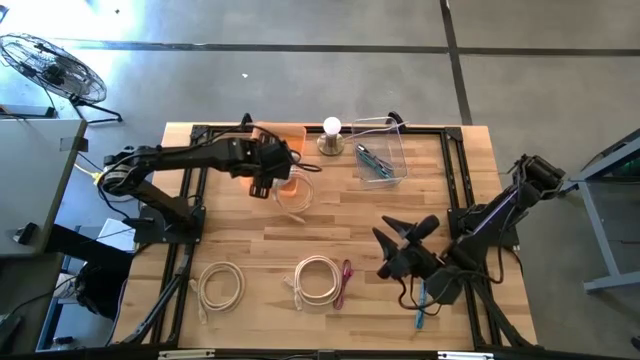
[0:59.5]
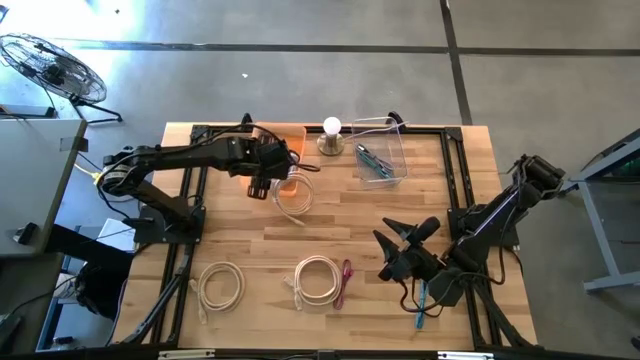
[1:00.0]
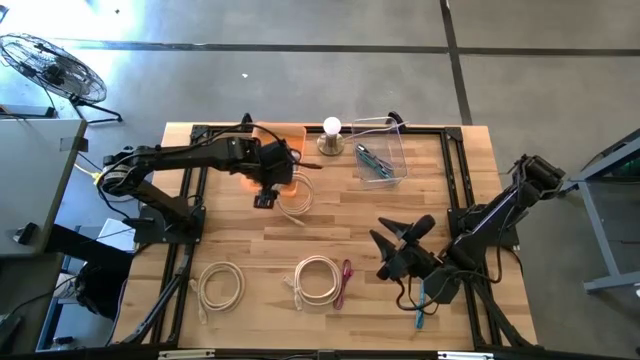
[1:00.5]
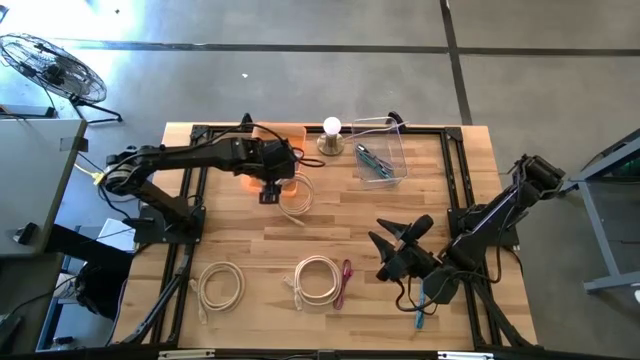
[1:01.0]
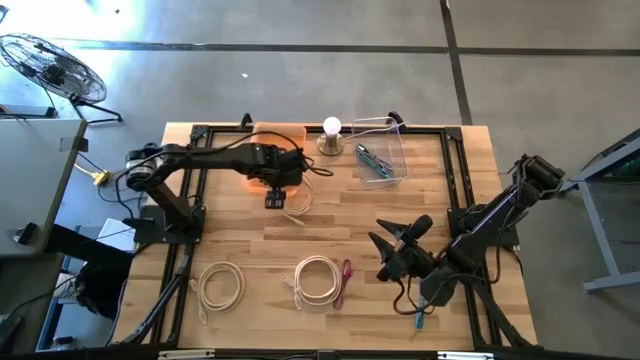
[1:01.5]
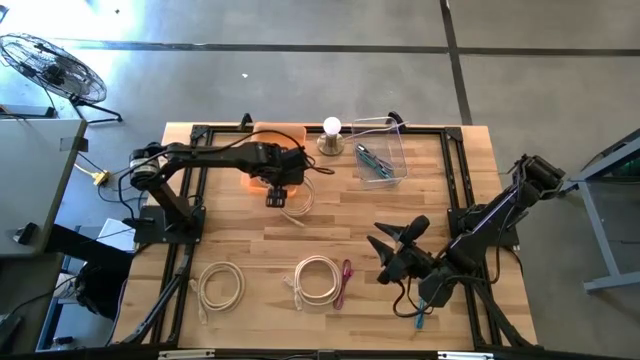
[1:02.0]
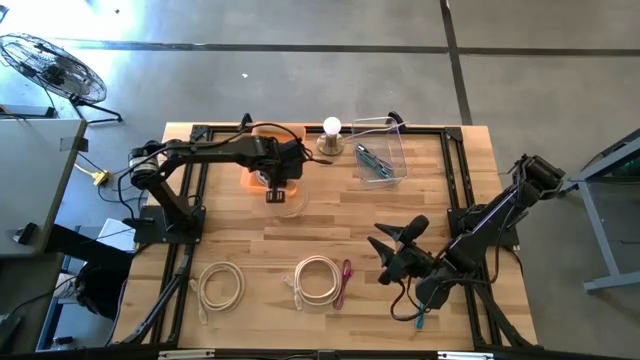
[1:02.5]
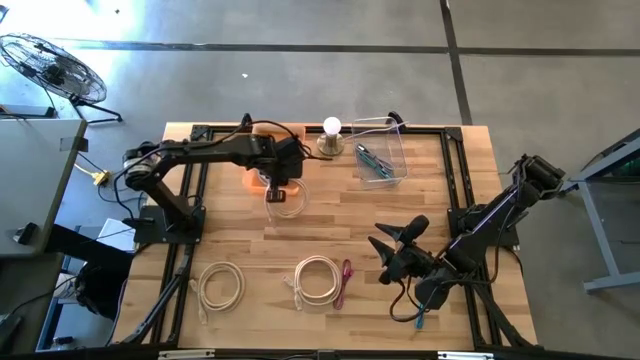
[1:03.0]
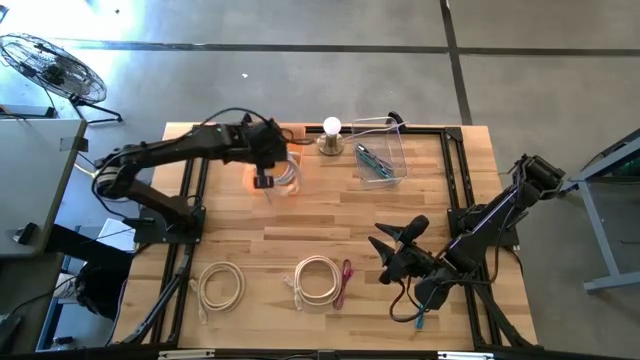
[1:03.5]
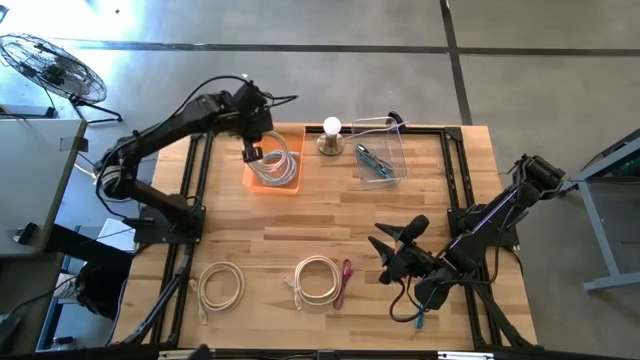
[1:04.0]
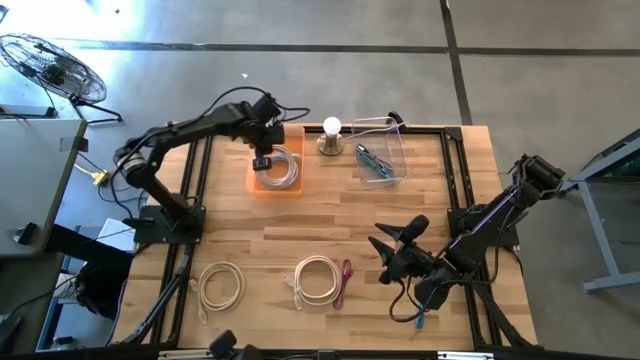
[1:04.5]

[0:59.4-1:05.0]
Task: Pick & Place USB Port
Put the top light brown HDMI cable into the orange bin

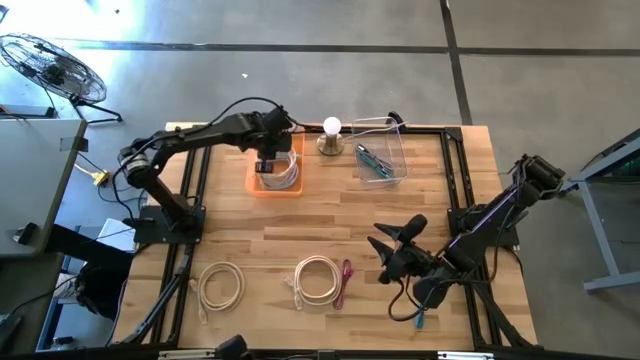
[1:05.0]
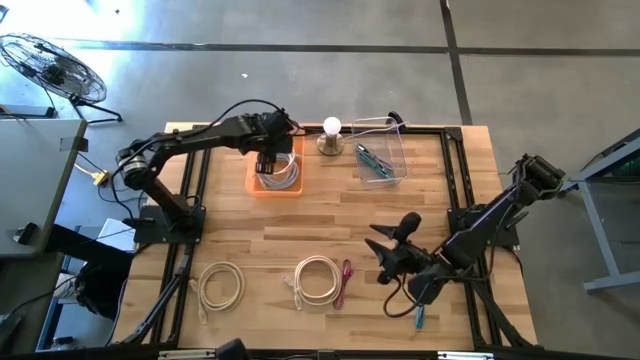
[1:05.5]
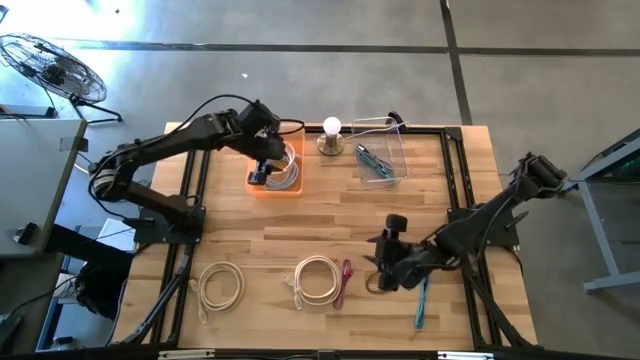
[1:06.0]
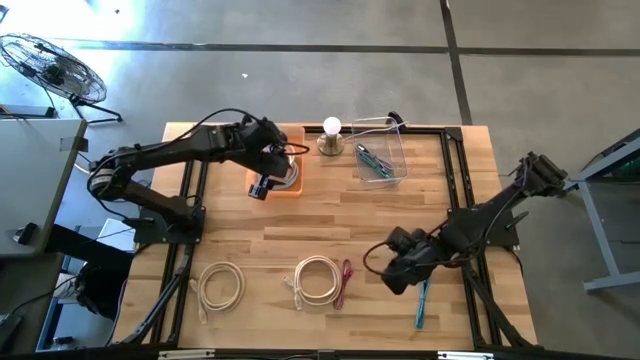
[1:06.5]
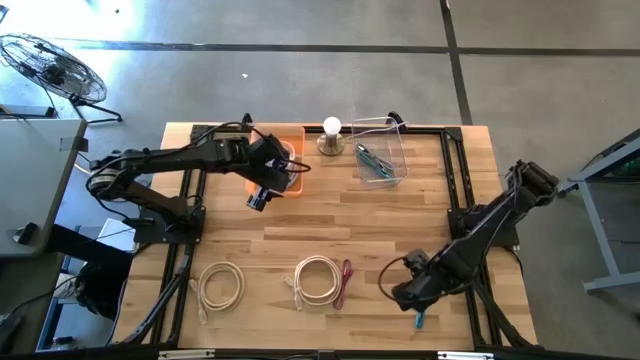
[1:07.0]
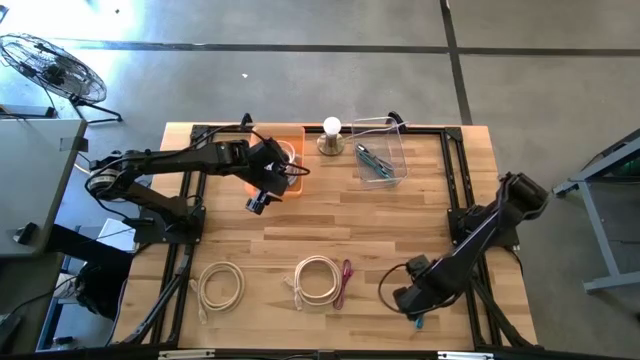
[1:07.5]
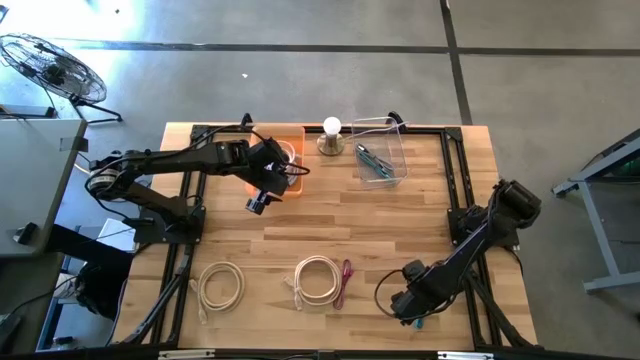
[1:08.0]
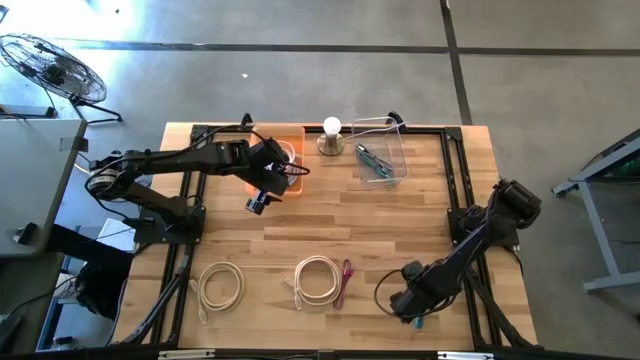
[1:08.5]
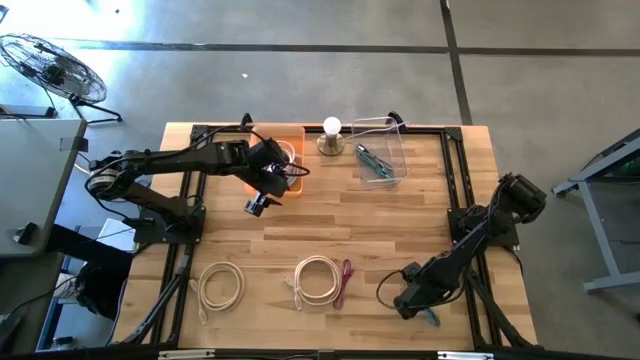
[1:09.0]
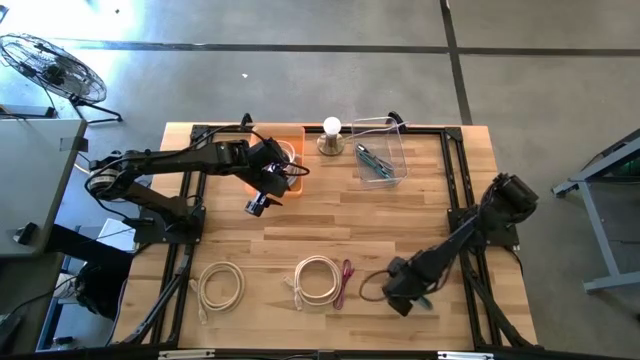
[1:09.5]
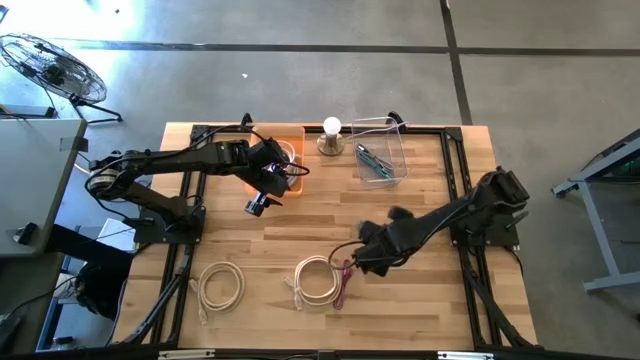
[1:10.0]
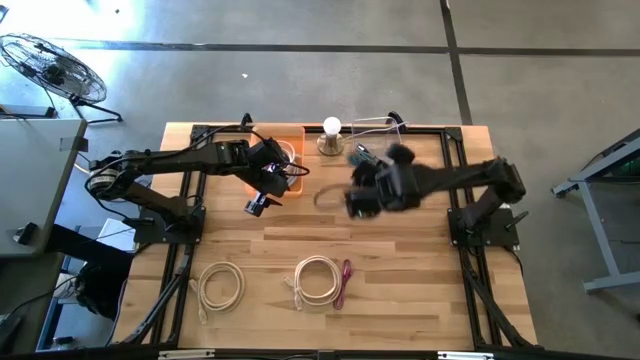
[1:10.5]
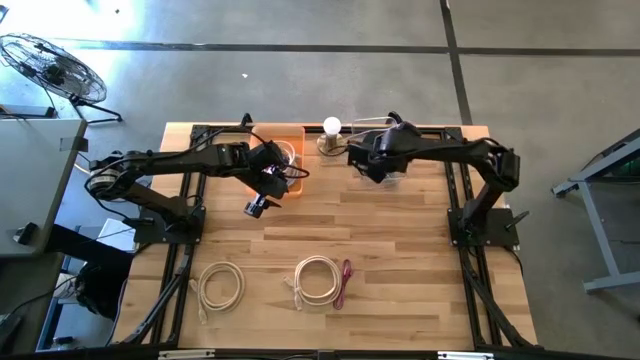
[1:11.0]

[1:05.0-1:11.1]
Put the blue charger cable into the transparent bin

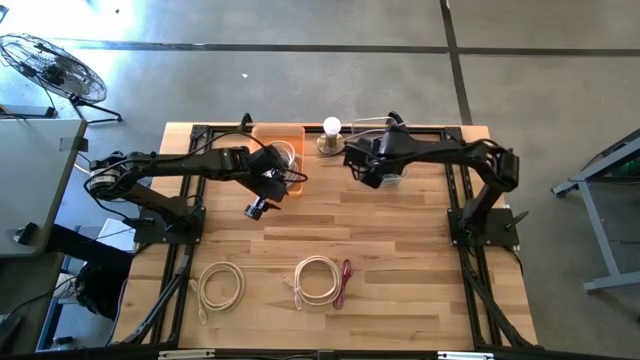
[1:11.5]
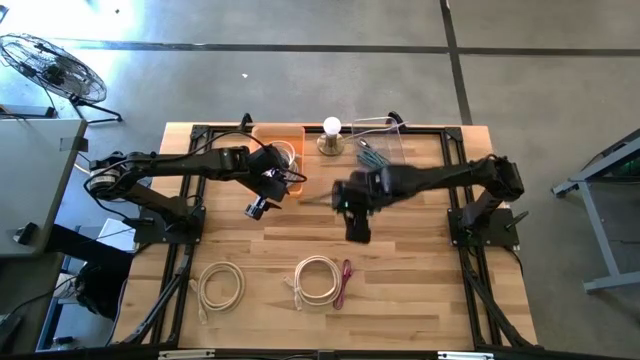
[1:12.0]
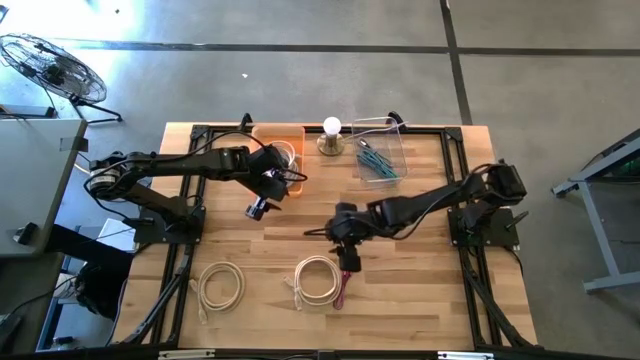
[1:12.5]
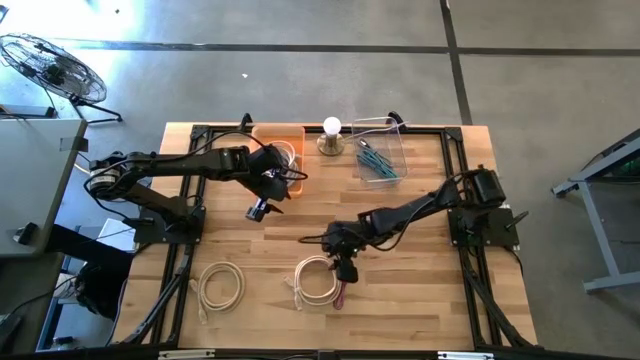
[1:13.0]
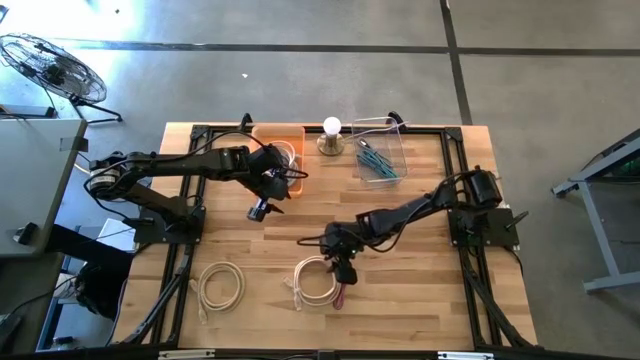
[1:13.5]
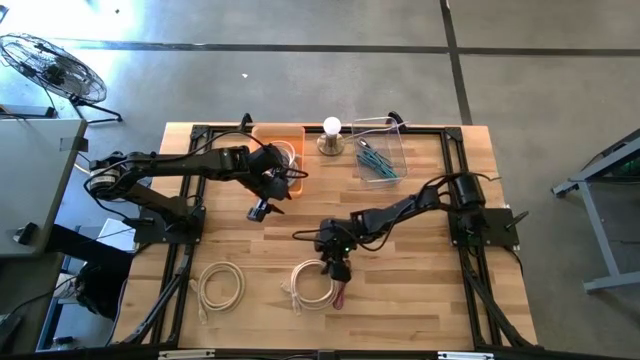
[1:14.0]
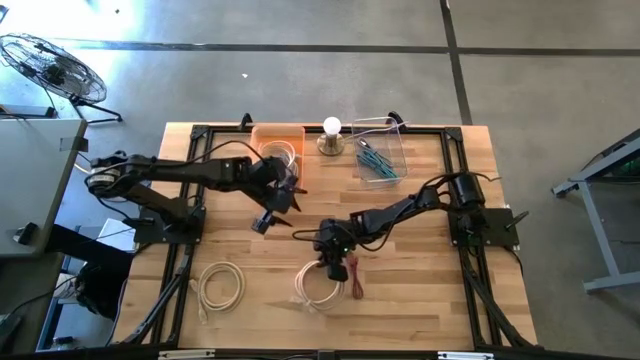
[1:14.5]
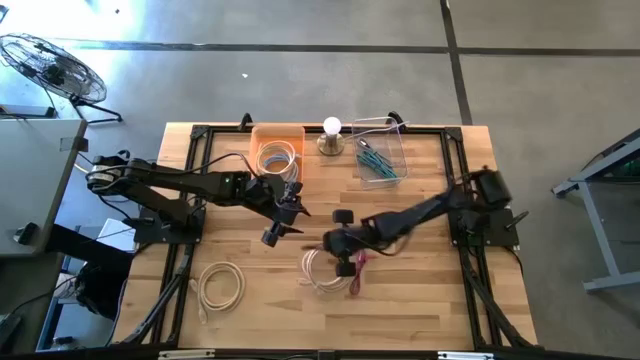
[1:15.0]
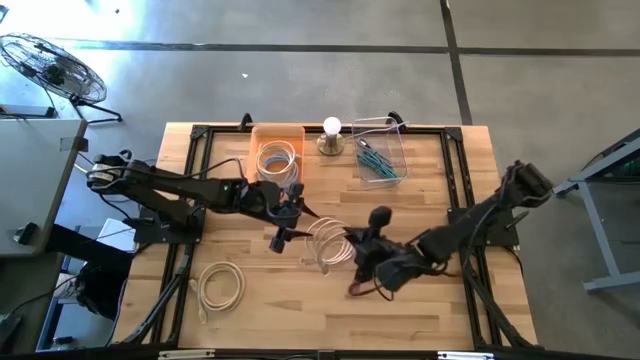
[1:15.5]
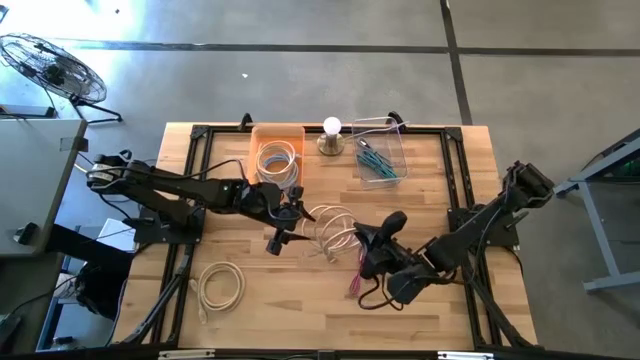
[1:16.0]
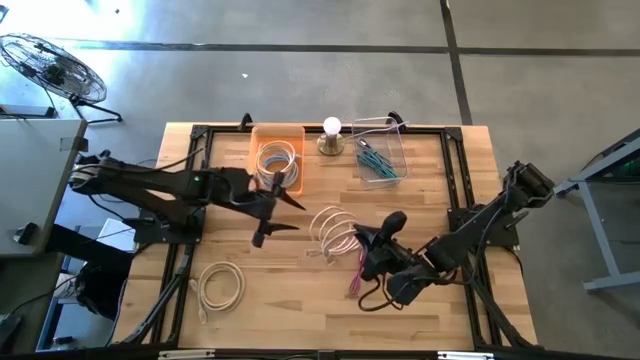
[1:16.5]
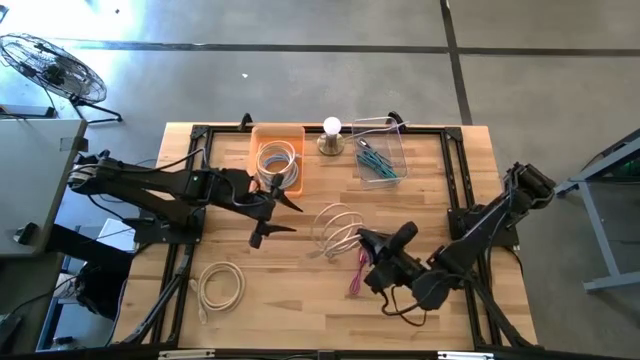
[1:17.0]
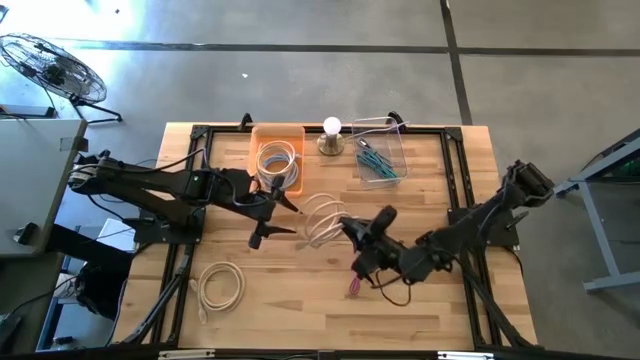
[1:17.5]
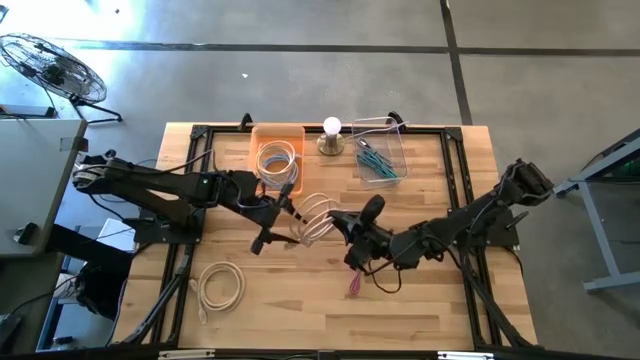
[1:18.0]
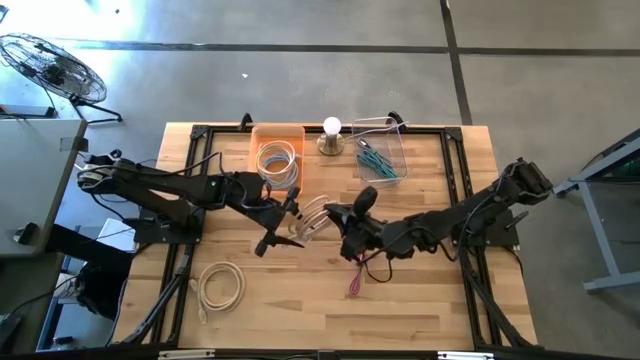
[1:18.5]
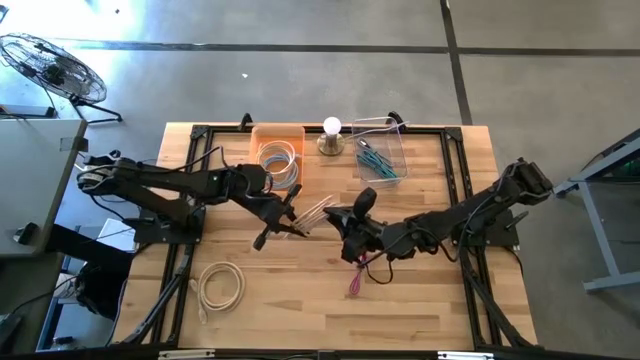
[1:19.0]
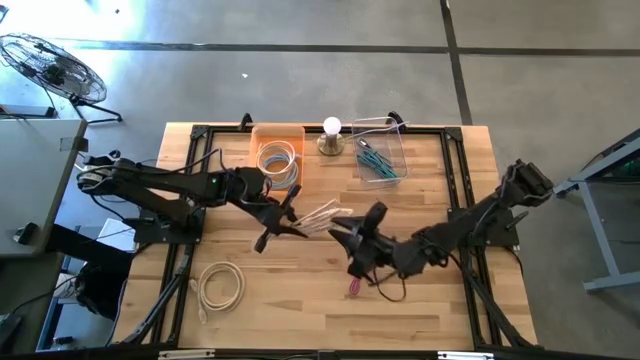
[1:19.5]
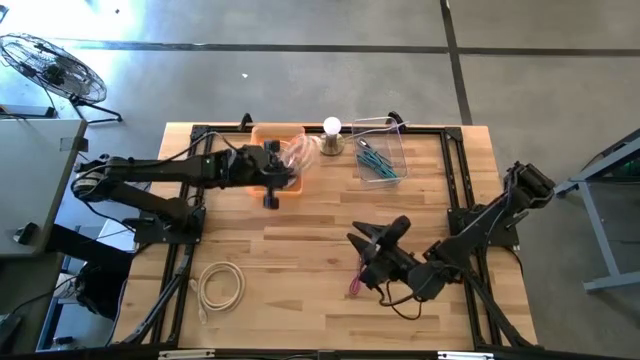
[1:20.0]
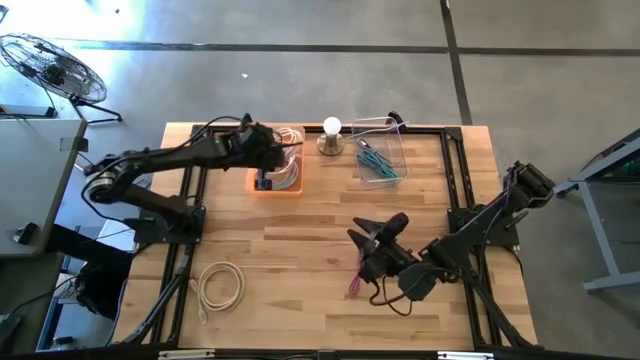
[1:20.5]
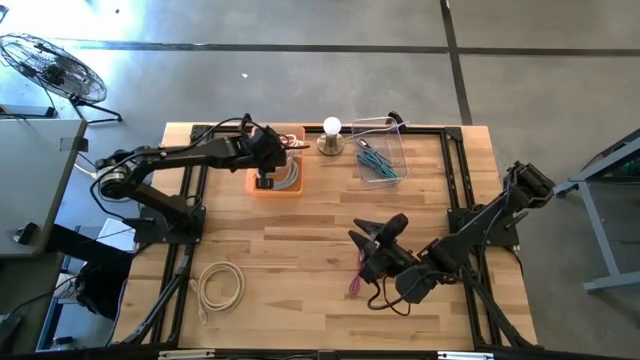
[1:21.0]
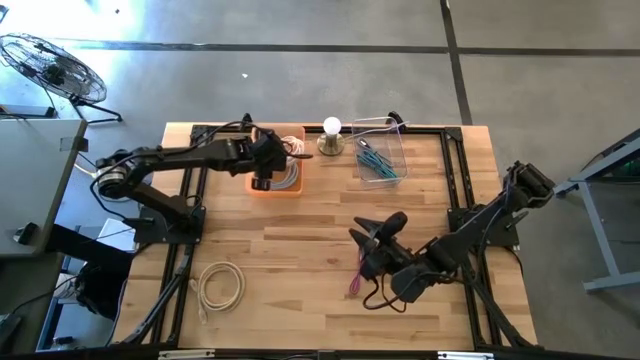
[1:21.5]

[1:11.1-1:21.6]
Put the right light brown HDMI cable into the orange bin
